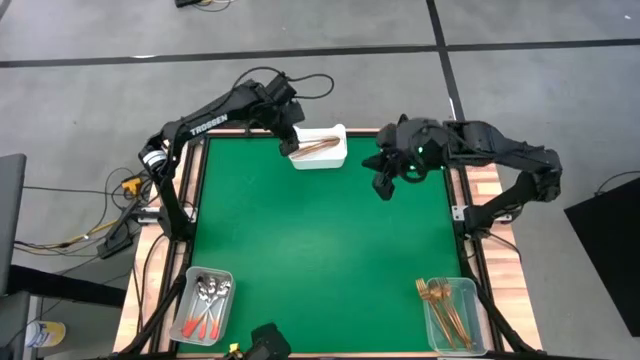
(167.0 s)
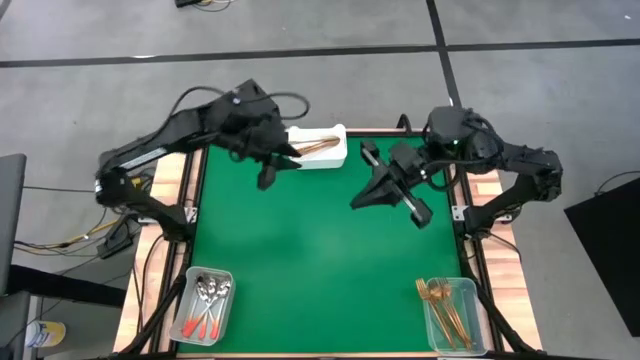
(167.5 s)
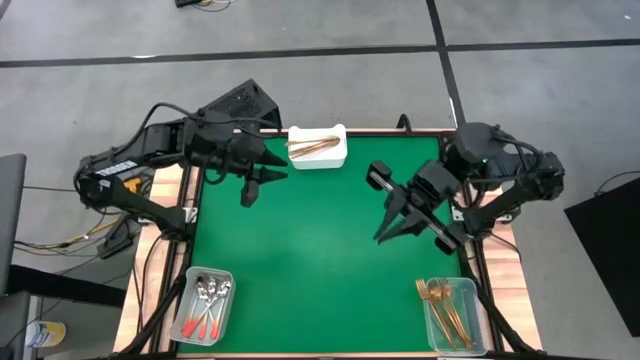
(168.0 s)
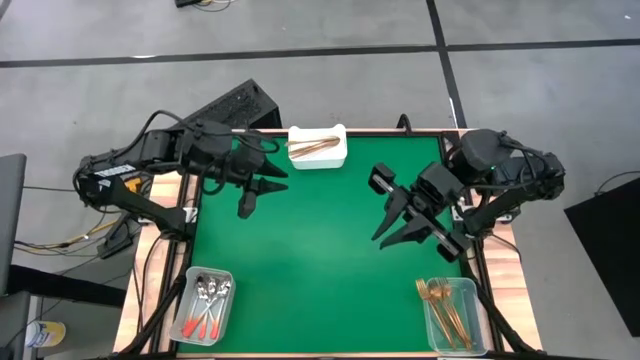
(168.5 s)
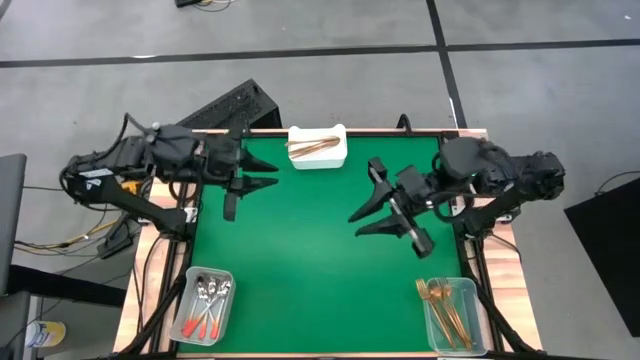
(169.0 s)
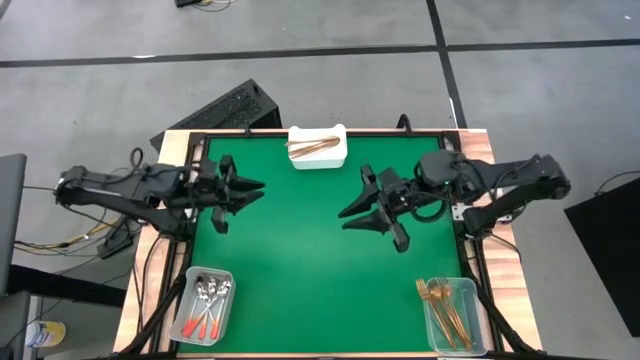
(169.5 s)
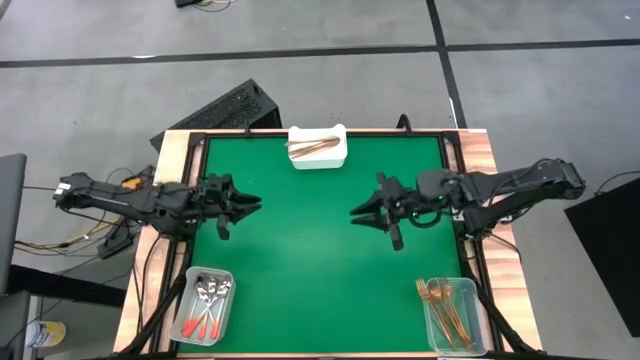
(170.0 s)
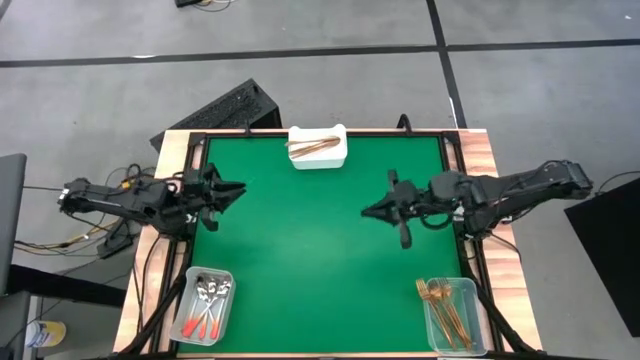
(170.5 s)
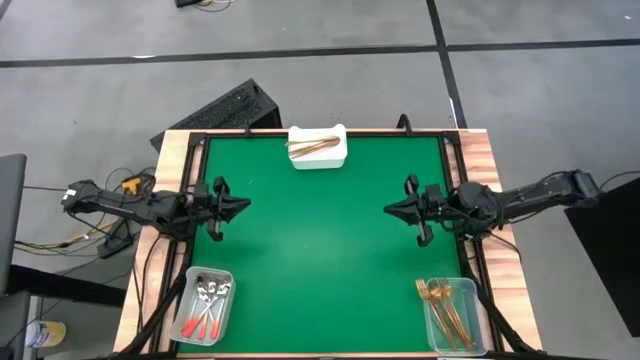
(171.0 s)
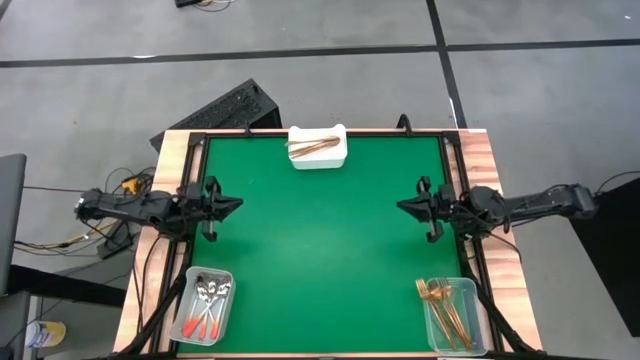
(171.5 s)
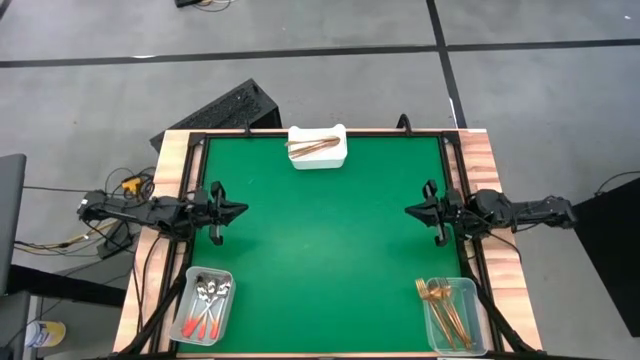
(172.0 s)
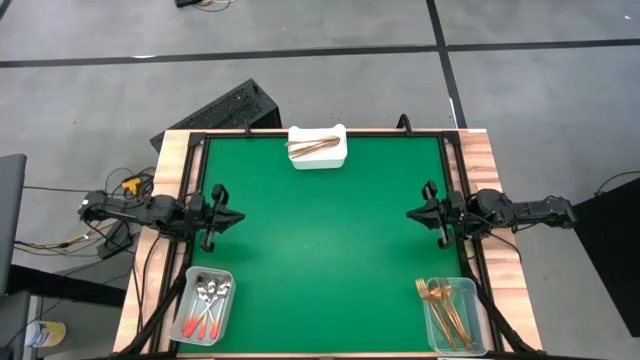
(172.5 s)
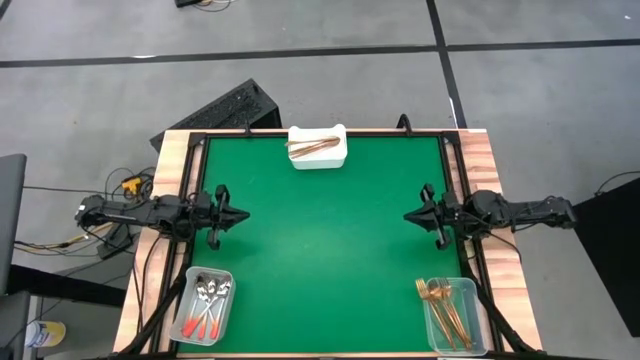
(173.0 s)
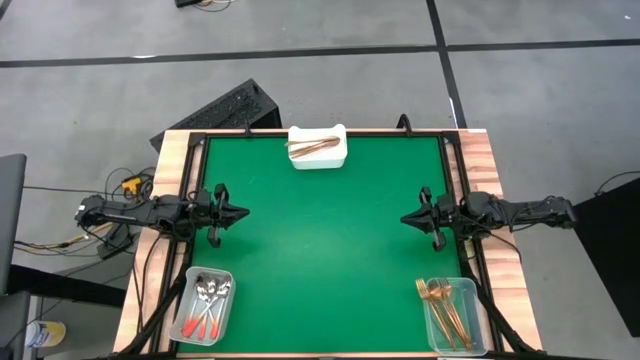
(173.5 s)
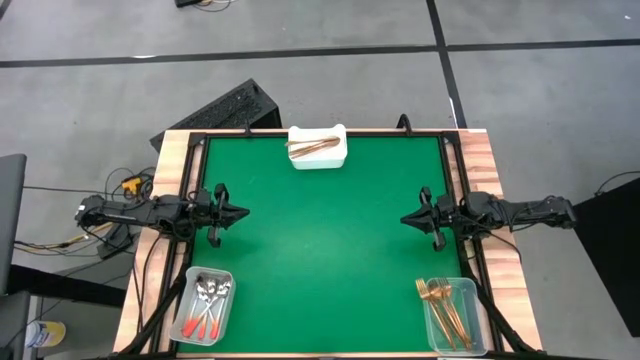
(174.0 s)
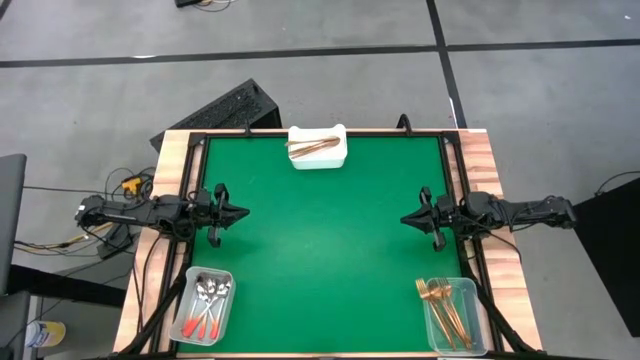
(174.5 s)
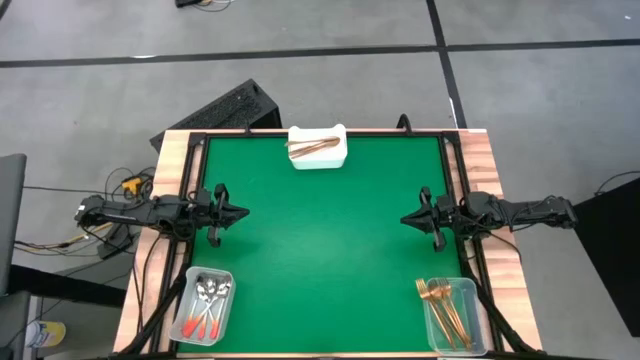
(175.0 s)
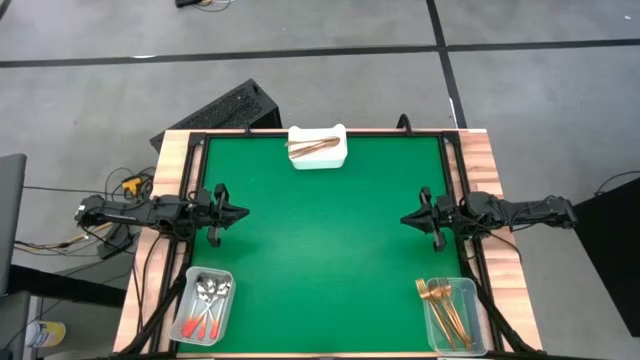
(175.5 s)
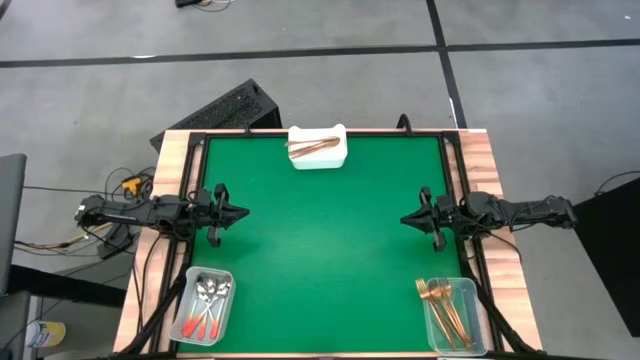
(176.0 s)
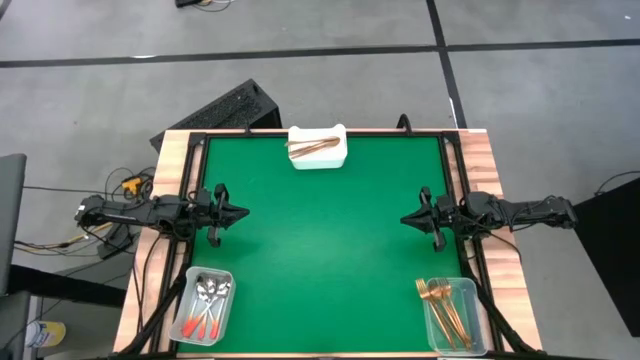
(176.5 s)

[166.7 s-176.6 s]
Task: Sort silverware by color (type)
Return to Home Position

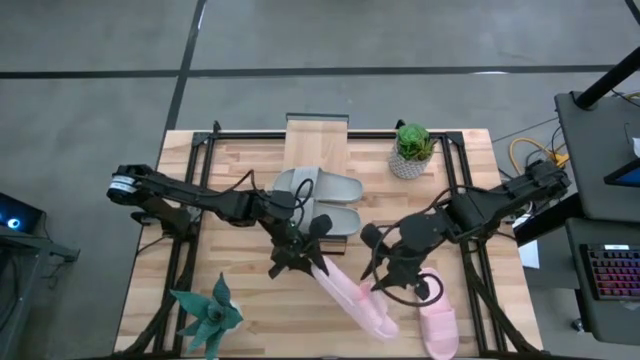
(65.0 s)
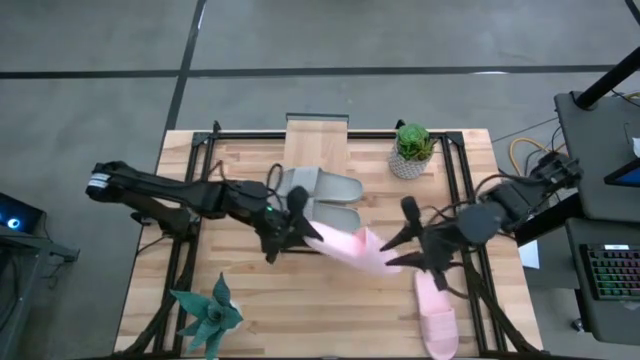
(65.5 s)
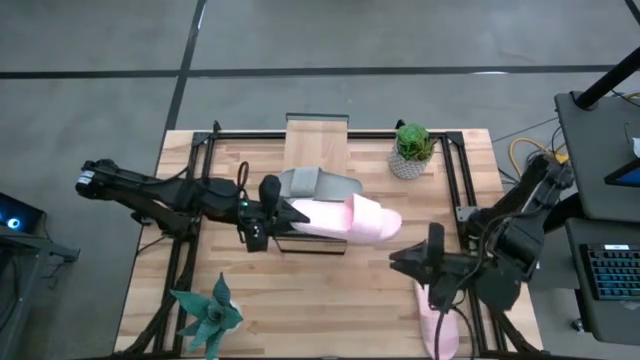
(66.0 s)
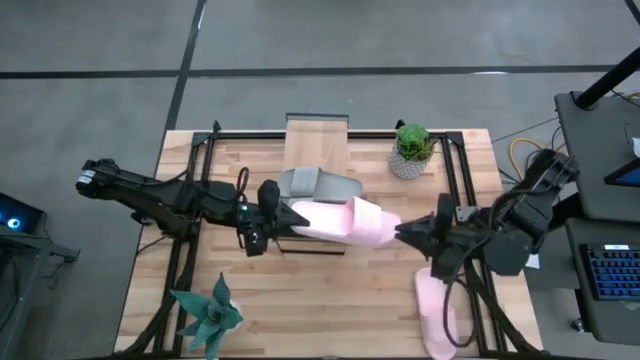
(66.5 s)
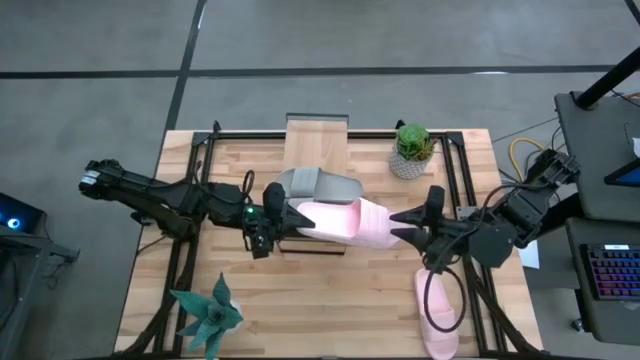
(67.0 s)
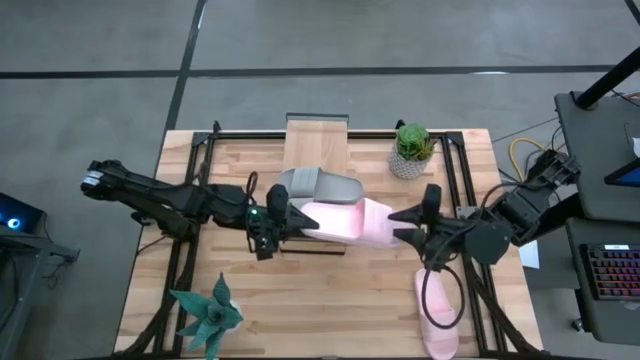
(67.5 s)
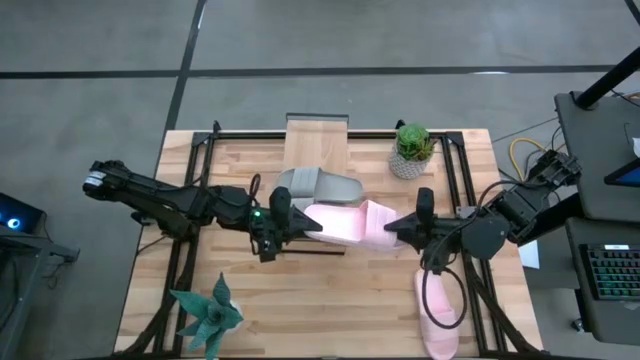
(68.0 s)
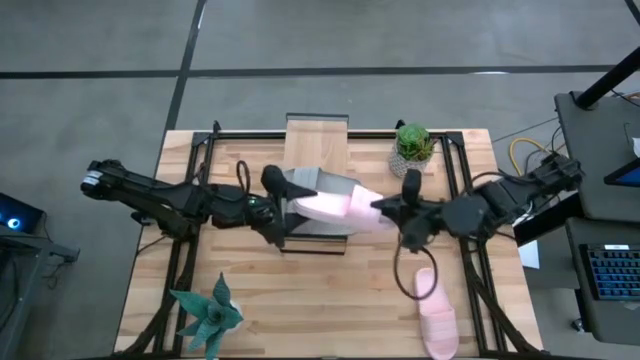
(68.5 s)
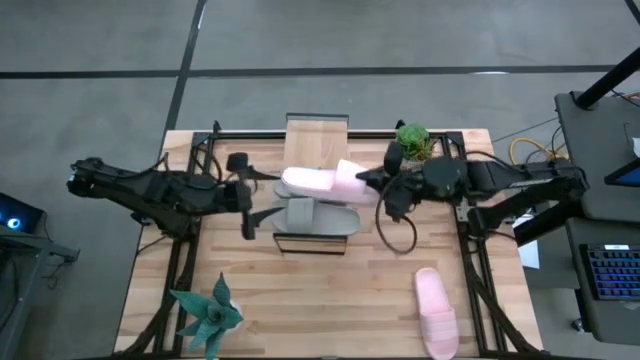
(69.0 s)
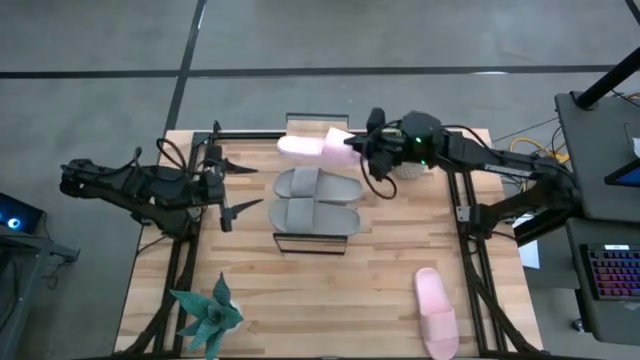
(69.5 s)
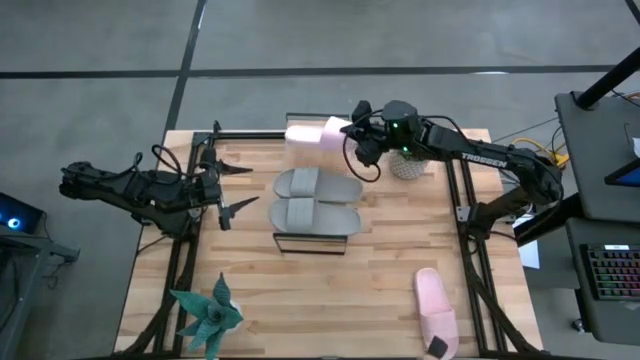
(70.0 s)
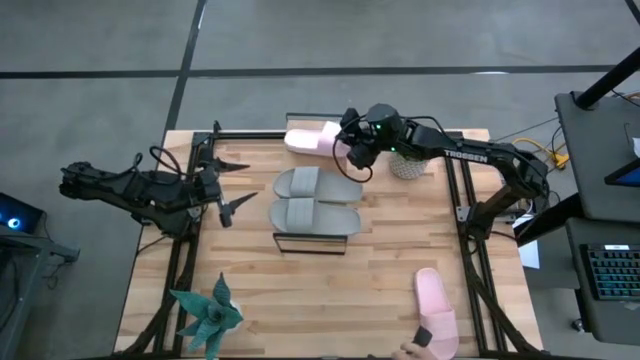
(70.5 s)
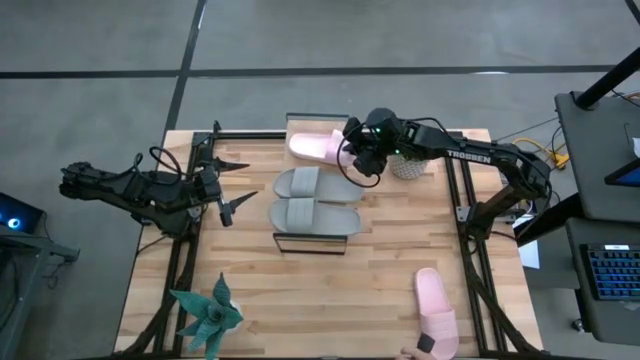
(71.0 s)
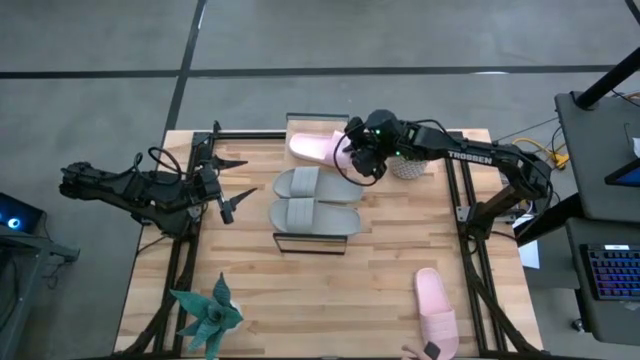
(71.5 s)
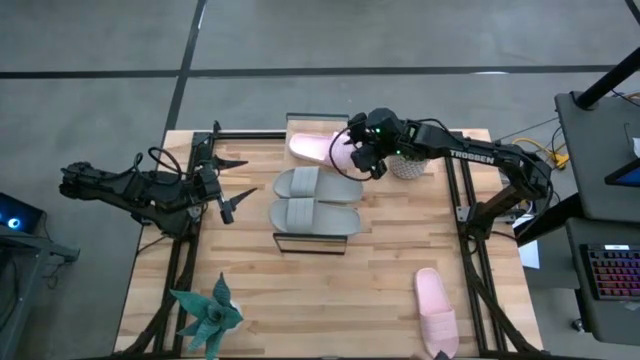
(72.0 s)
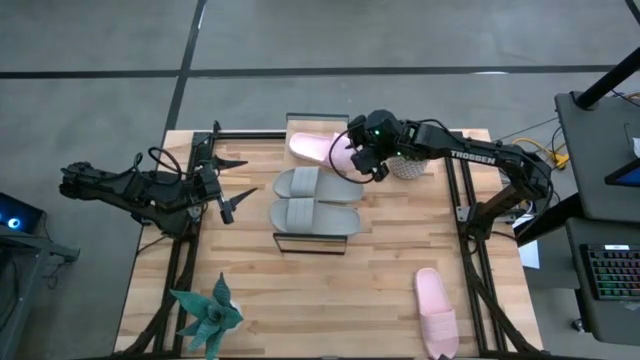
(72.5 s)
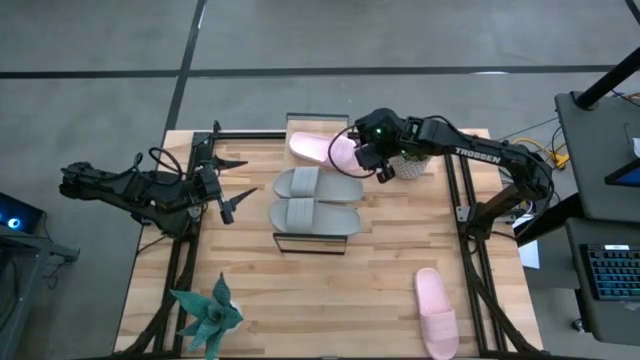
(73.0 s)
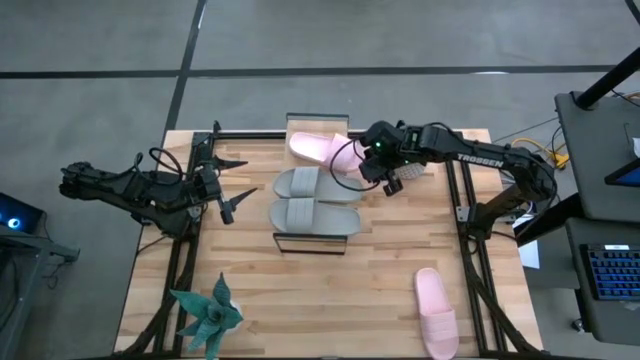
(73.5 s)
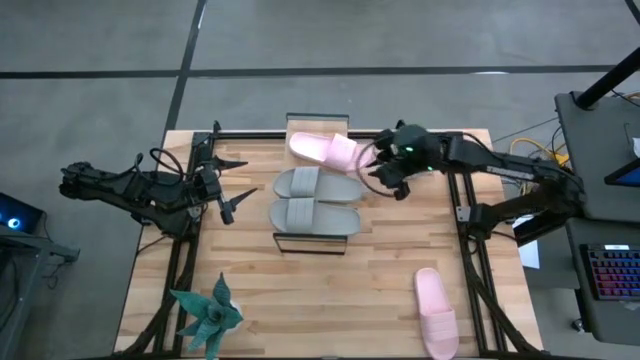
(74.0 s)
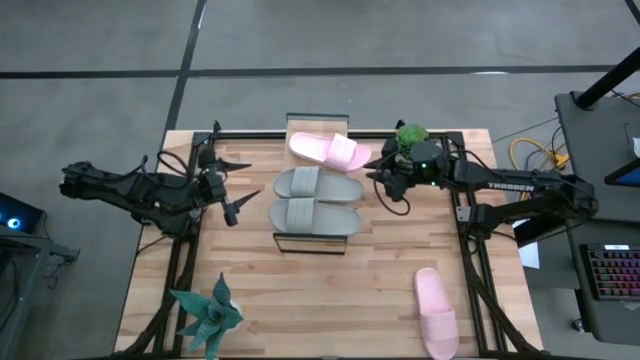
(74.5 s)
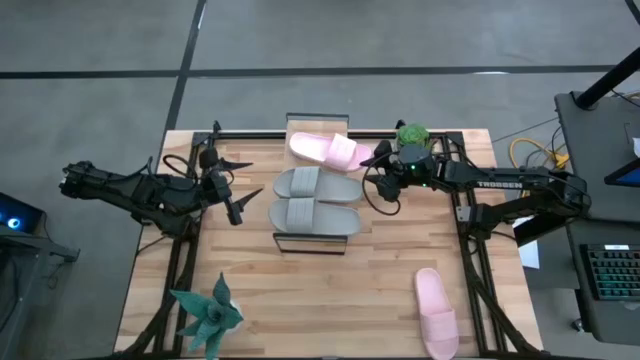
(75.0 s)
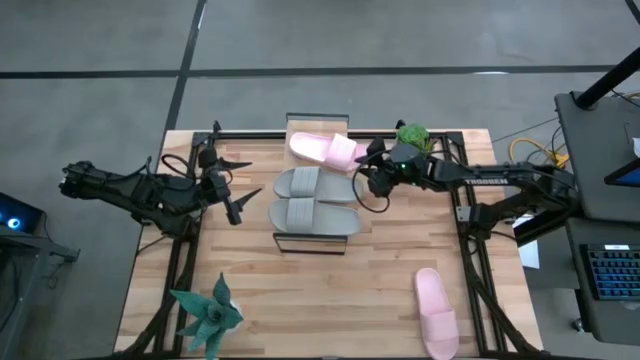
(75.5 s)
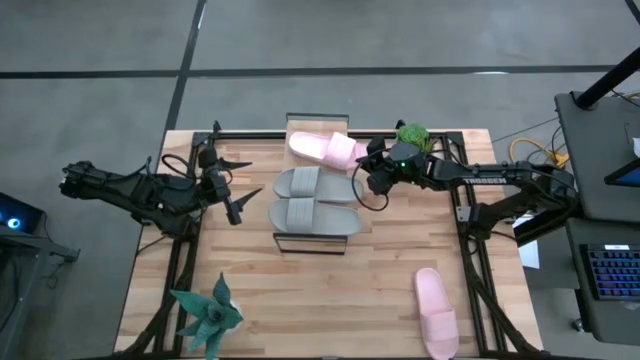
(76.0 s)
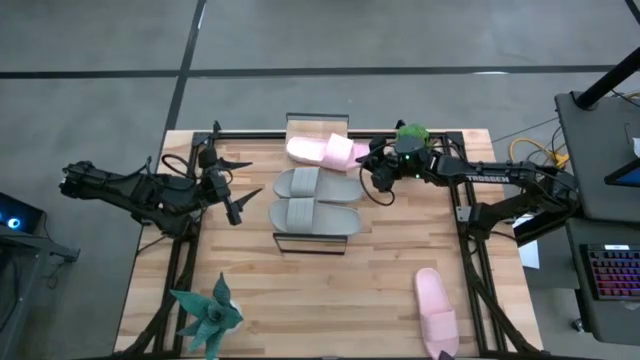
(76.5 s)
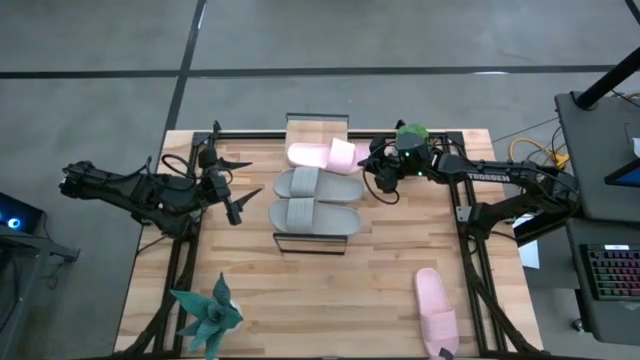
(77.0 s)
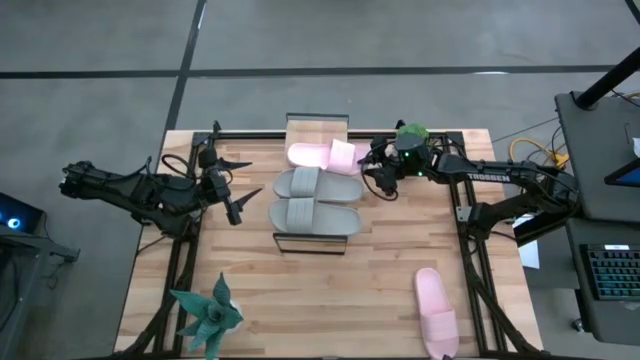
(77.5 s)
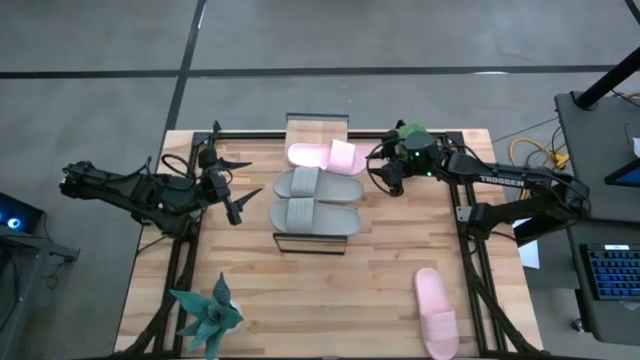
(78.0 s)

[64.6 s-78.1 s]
Task: Pick and place slides into the shelf
Put the left pink slide on the shelf
